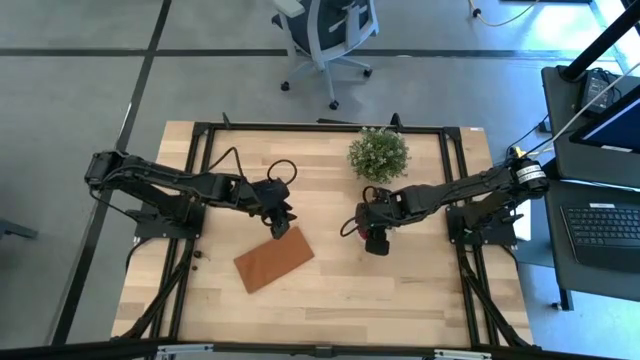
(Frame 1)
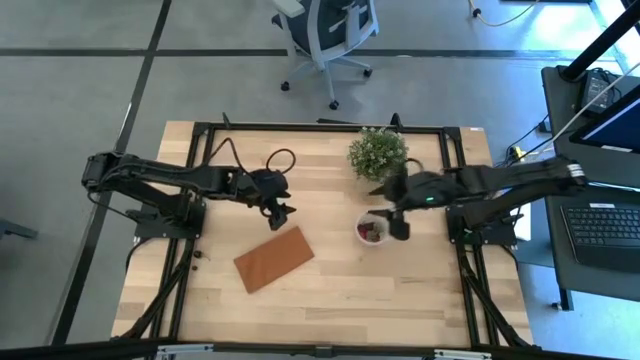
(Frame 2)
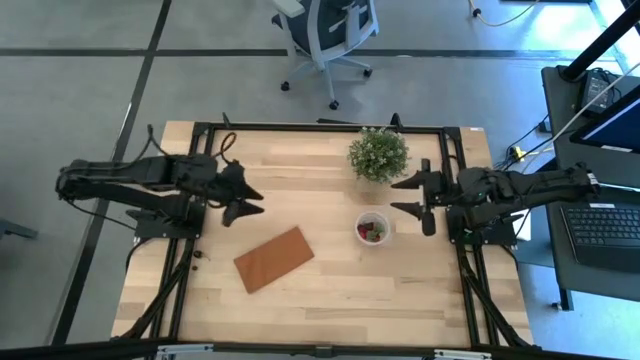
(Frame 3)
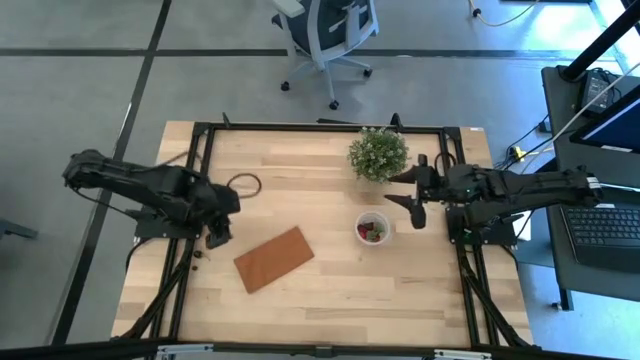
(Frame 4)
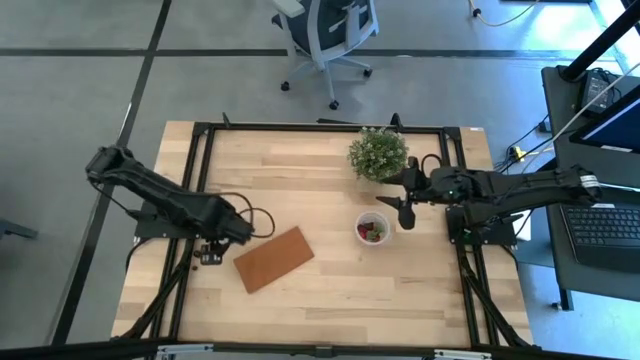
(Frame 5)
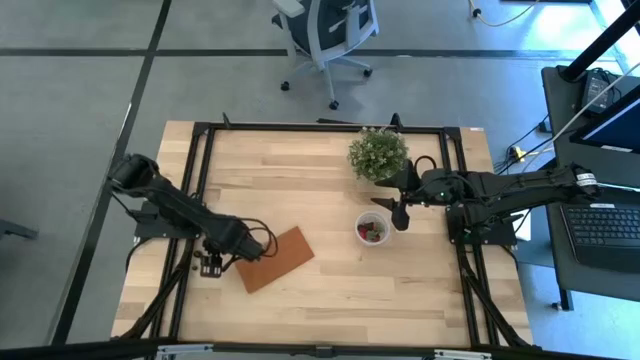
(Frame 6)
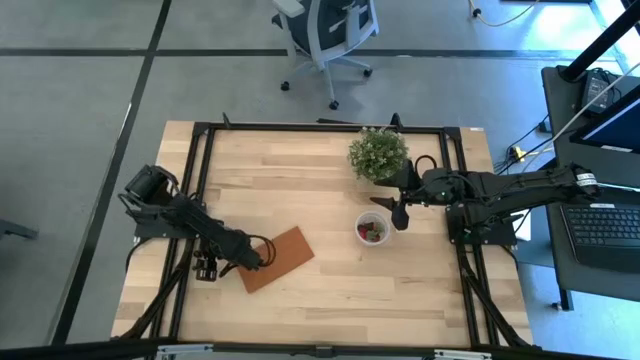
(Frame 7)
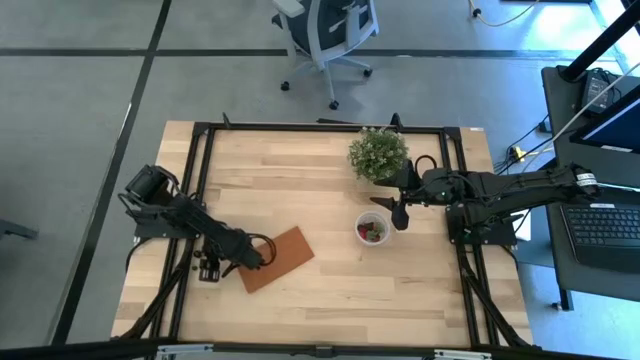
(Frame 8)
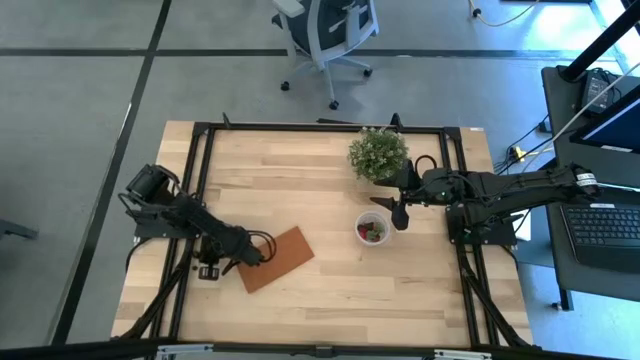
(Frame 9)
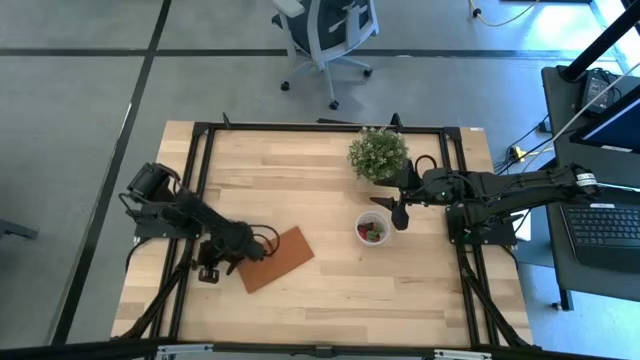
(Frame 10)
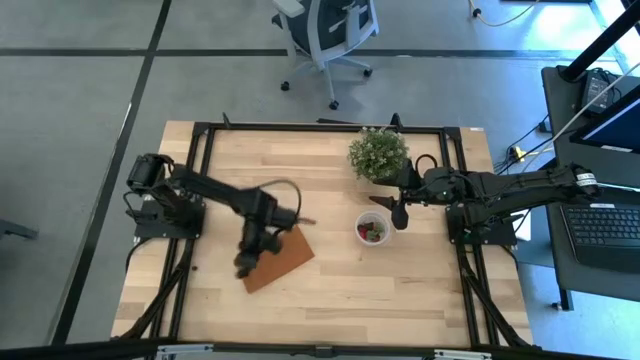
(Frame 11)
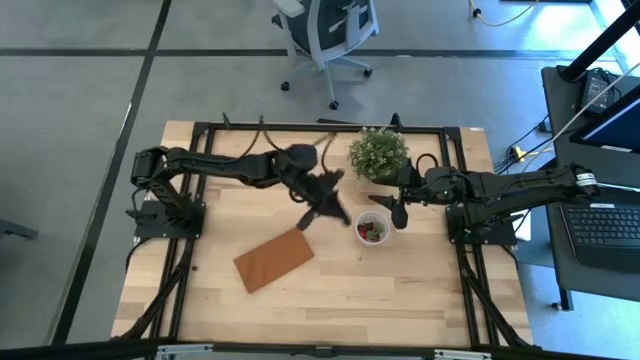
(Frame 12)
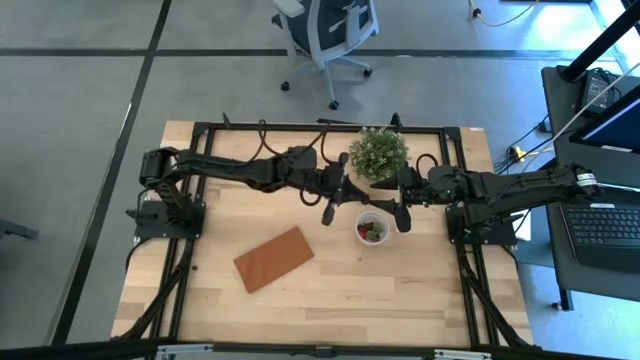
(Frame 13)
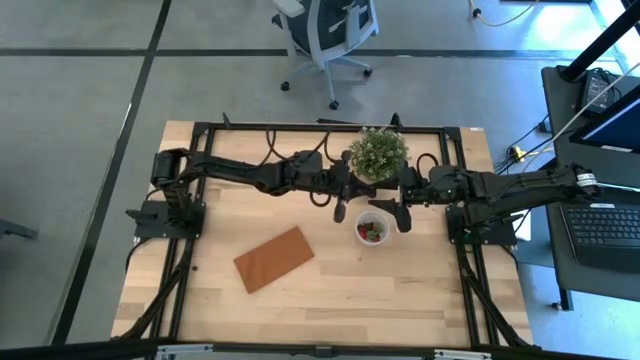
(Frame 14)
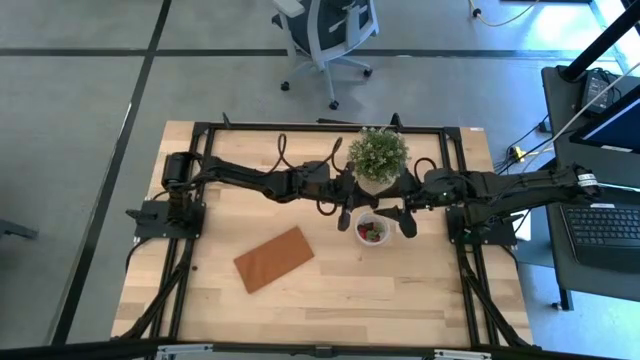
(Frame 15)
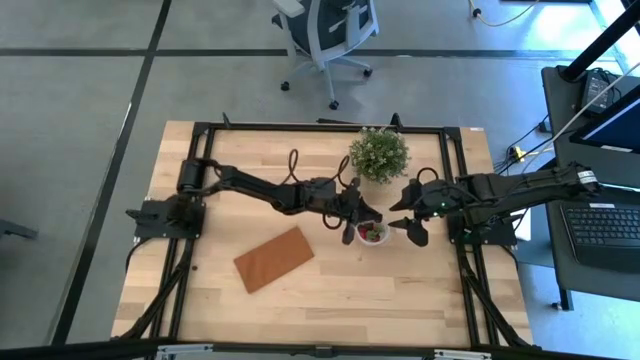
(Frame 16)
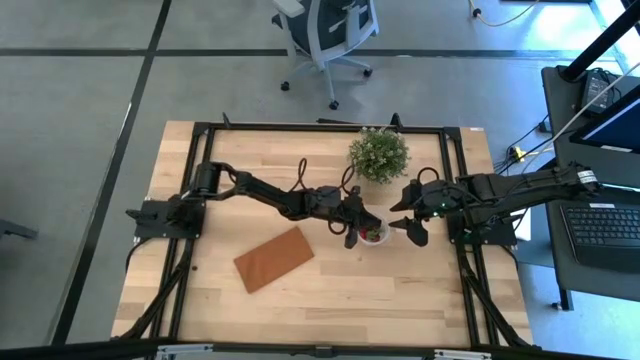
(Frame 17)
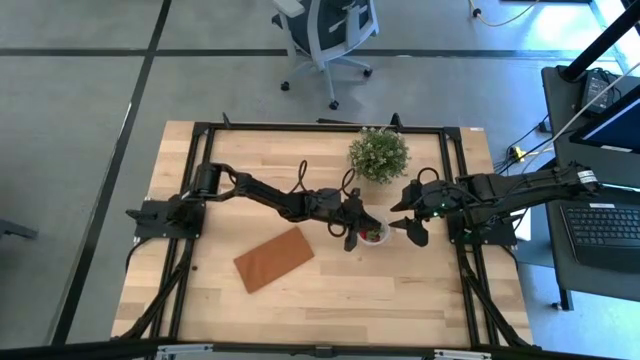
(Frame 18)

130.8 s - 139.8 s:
Task: Pick and placing Produce into tupperware
Put the black cherry into the transparent container

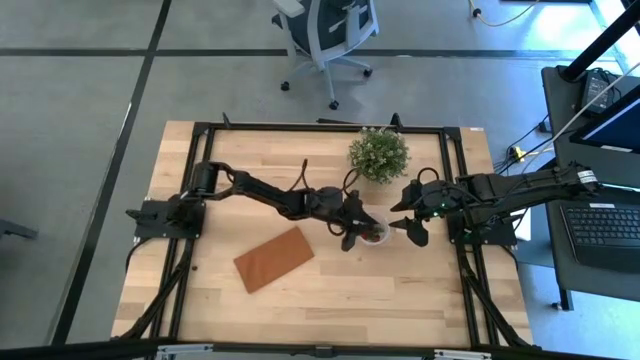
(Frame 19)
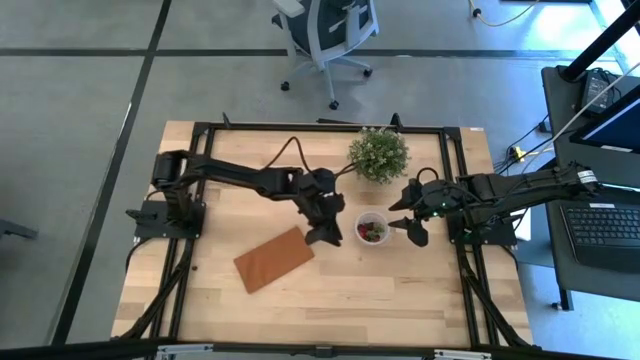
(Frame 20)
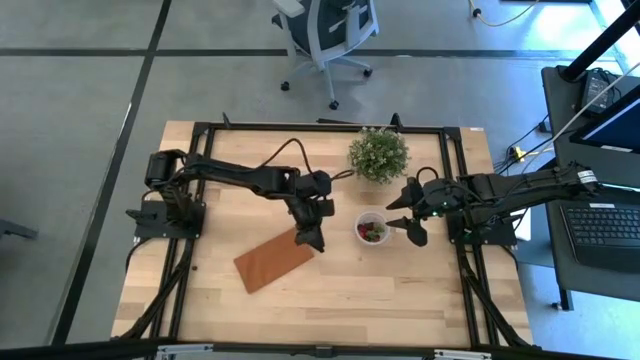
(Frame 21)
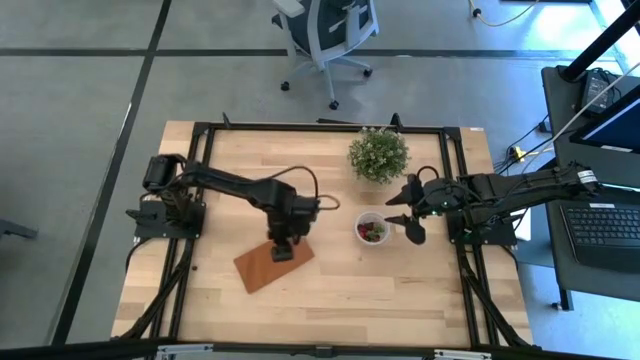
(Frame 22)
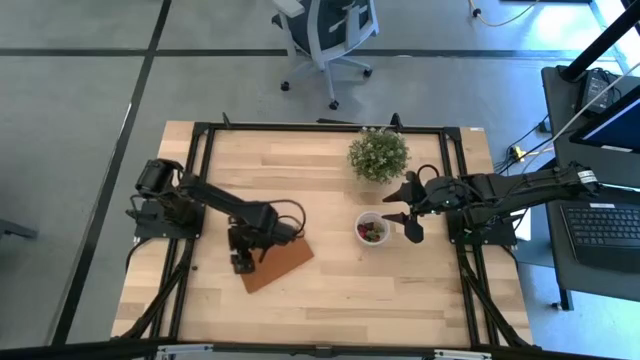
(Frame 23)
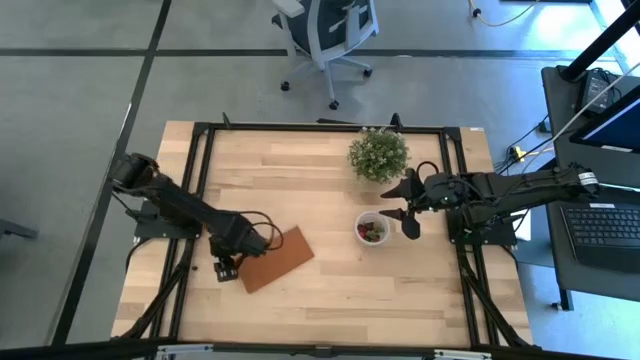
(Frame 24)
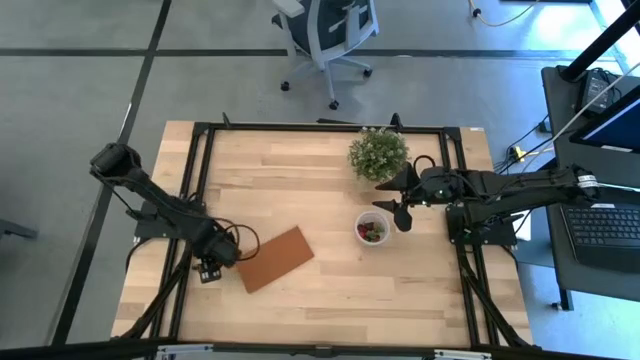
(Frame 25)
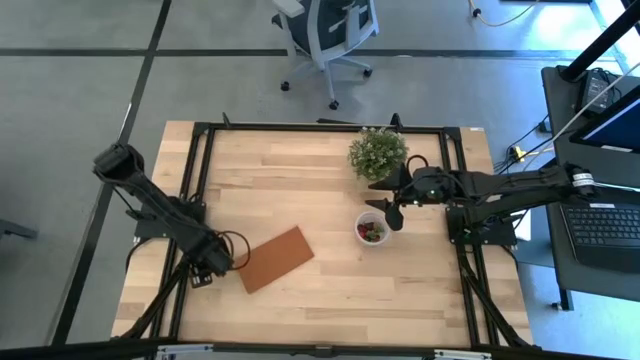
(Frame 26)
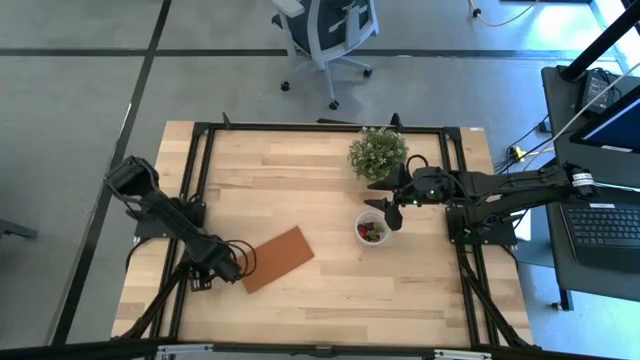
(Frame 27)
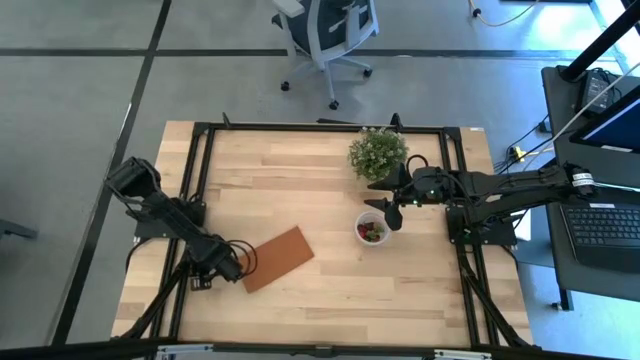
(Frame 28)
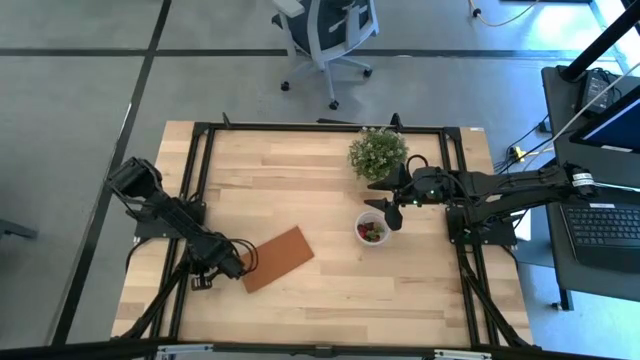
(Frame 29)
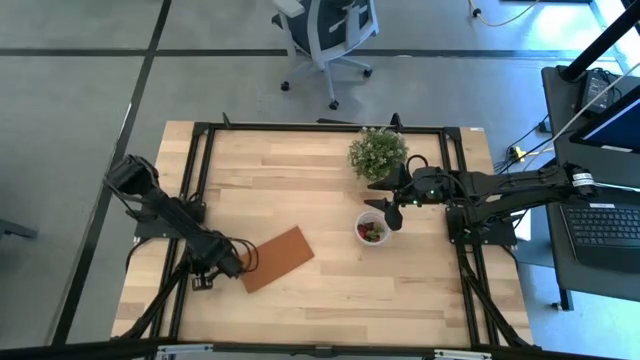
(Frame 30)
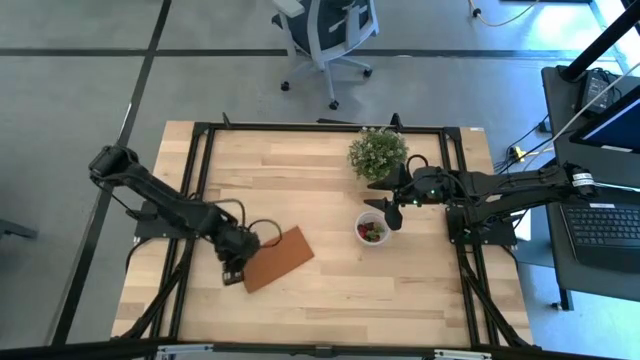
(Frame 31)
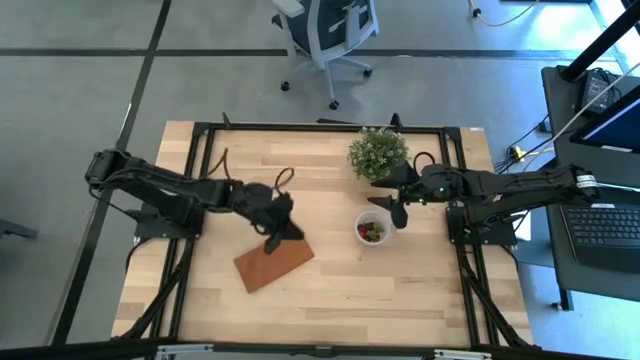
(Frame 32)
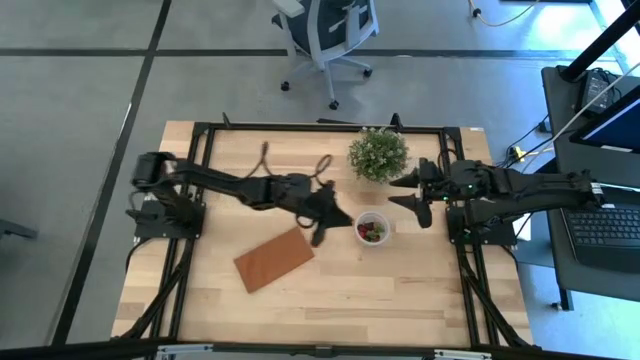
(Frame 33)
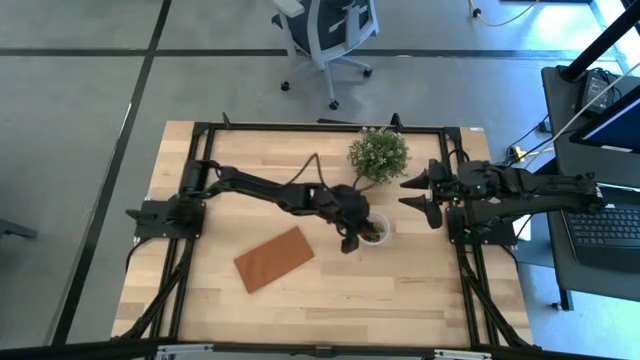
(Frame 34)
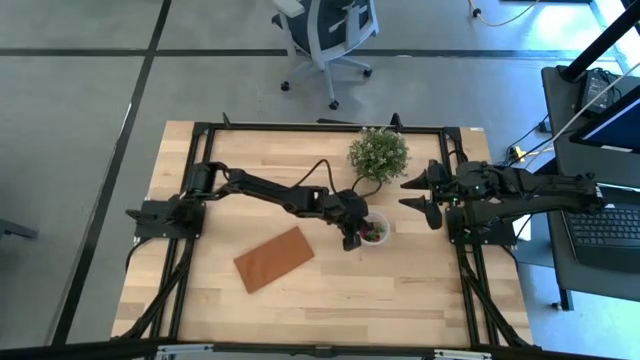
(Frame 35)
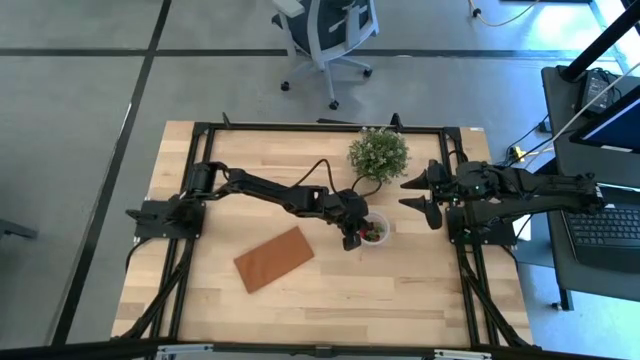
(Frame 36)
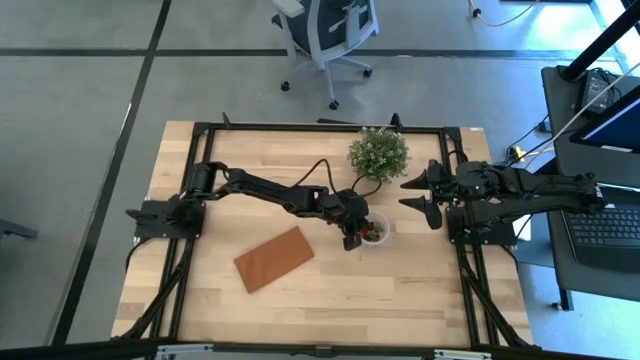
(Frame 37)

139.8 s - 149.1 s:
Put the blueberry into the transparent container

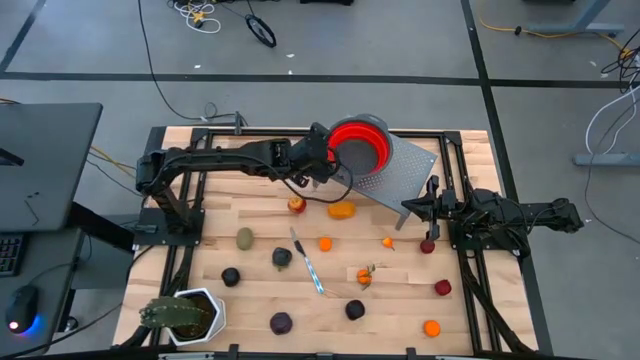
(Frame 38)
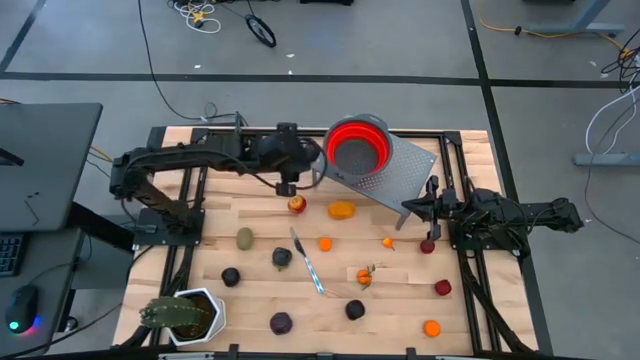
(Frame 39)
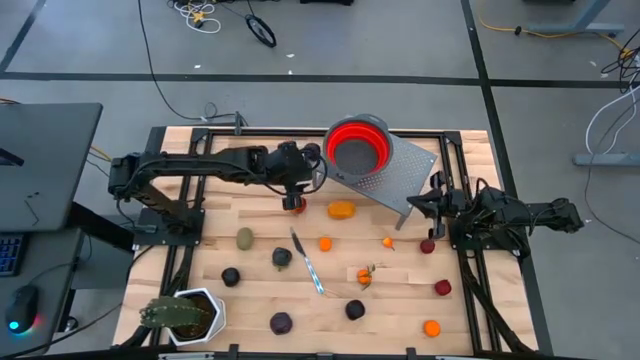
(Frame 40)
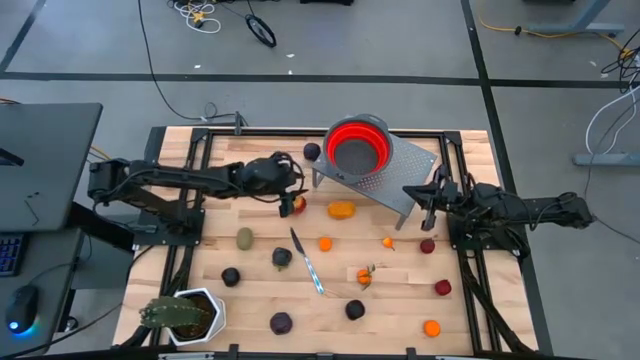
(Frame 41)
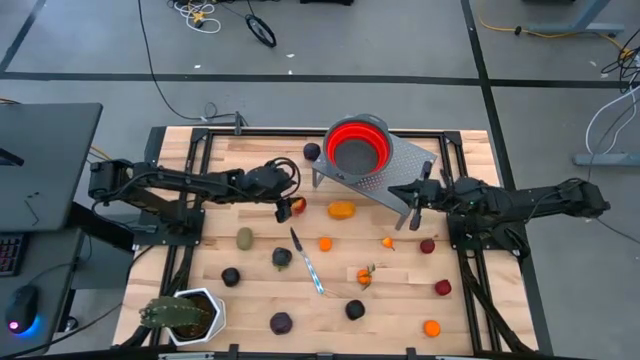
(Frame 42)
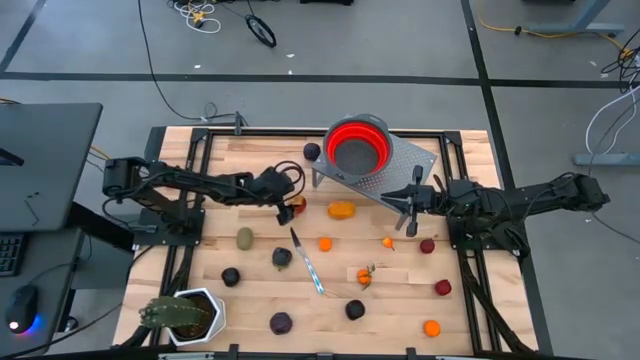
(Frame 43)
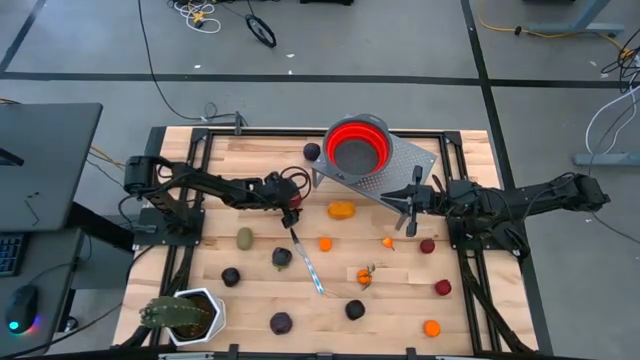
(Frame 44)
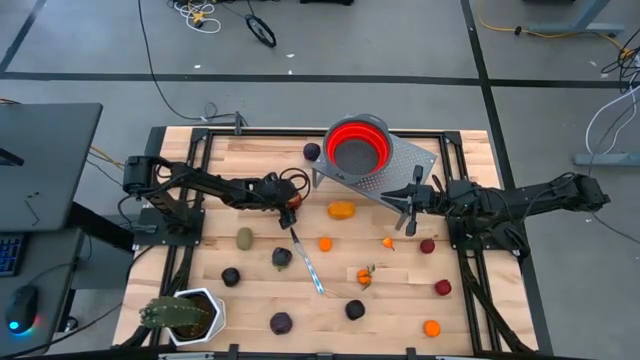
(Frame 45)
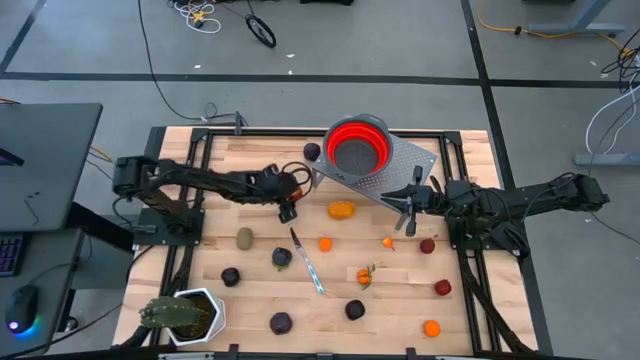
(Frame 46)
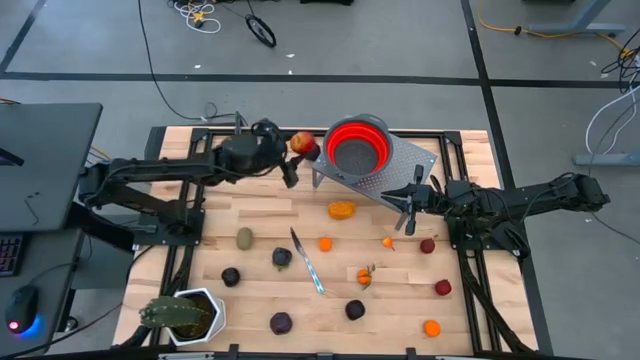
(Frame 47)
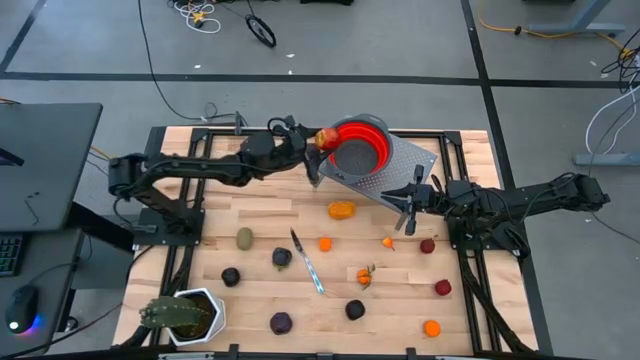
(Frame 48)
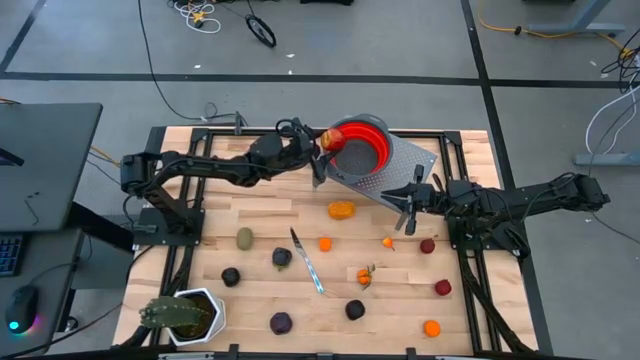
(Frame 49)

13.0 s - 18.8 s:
Task: Pick & Place Fruit
Put the apple into the red strainer bowl
